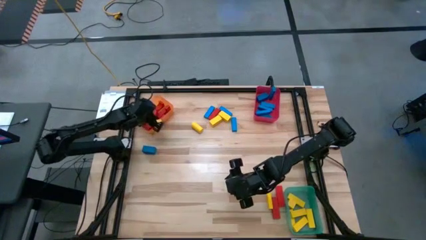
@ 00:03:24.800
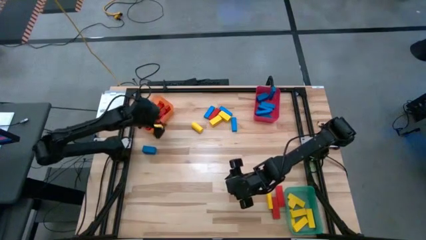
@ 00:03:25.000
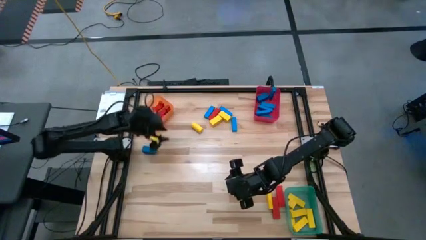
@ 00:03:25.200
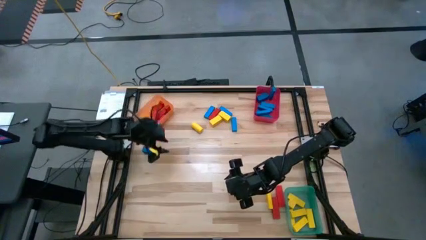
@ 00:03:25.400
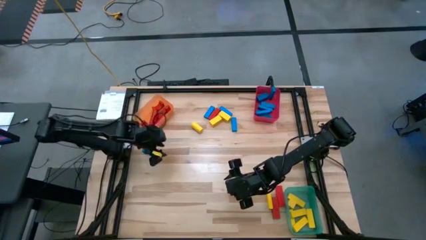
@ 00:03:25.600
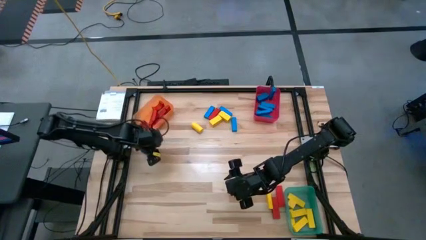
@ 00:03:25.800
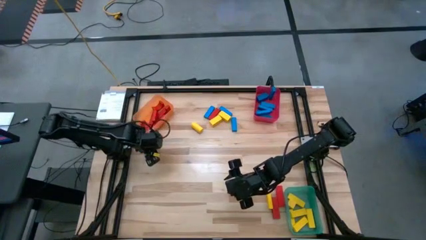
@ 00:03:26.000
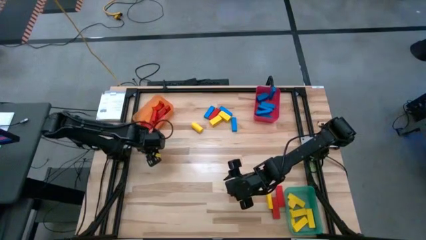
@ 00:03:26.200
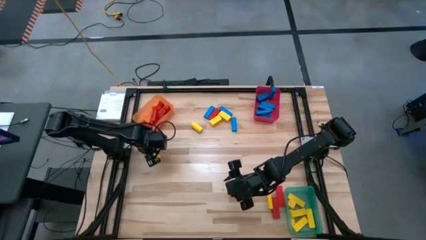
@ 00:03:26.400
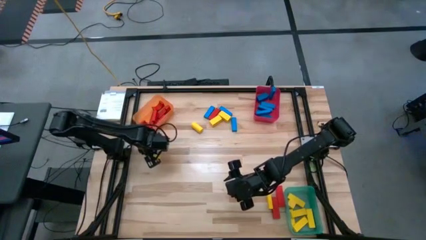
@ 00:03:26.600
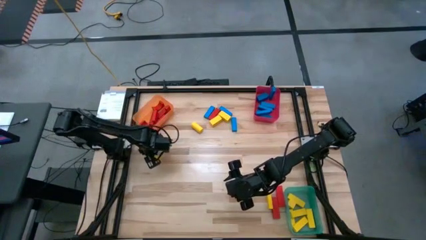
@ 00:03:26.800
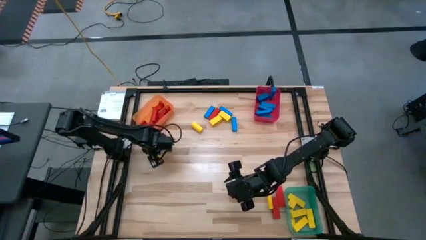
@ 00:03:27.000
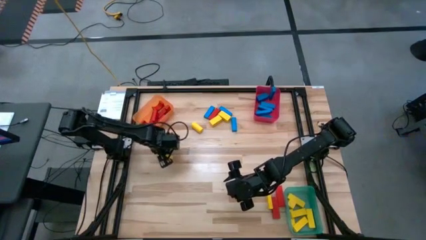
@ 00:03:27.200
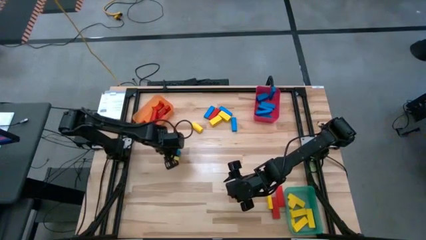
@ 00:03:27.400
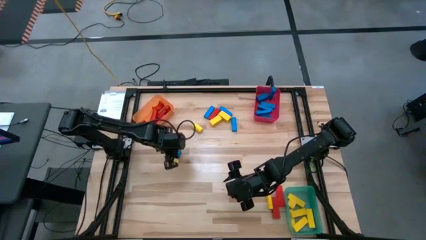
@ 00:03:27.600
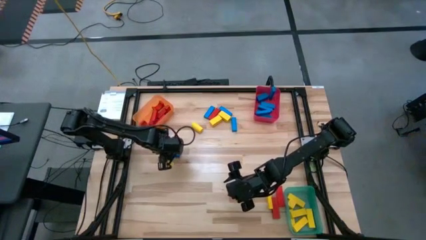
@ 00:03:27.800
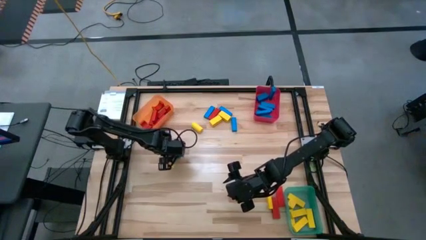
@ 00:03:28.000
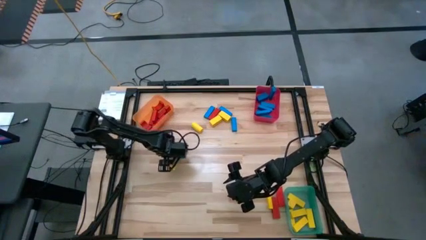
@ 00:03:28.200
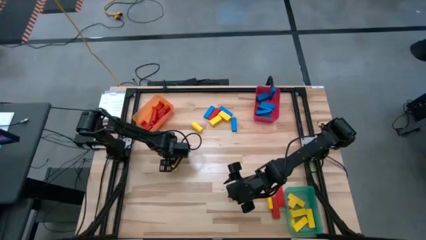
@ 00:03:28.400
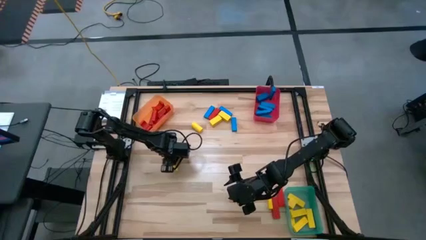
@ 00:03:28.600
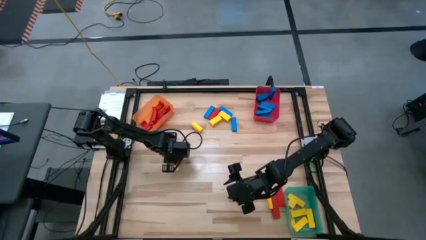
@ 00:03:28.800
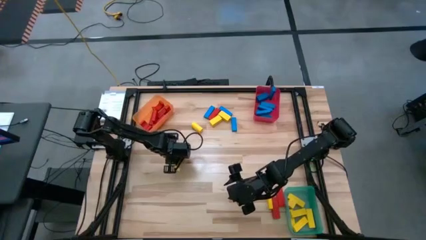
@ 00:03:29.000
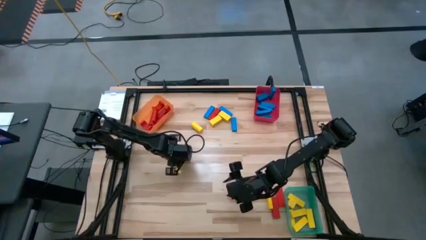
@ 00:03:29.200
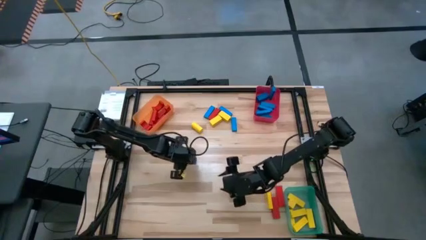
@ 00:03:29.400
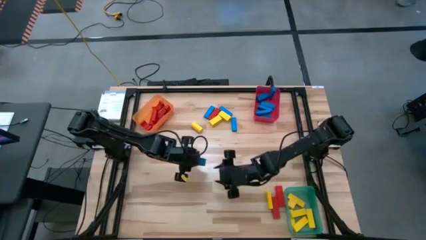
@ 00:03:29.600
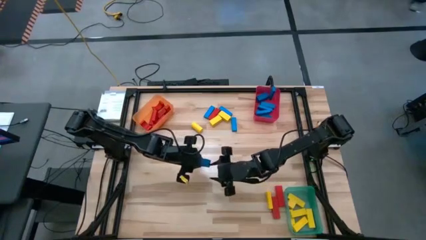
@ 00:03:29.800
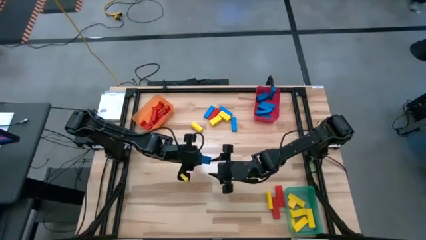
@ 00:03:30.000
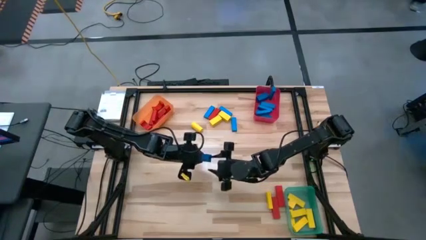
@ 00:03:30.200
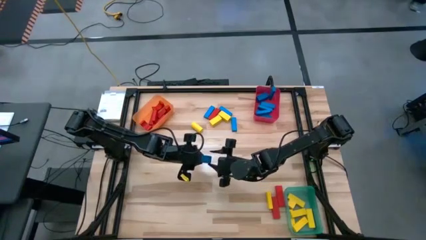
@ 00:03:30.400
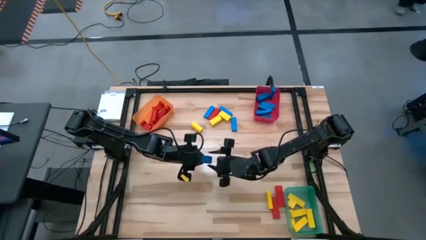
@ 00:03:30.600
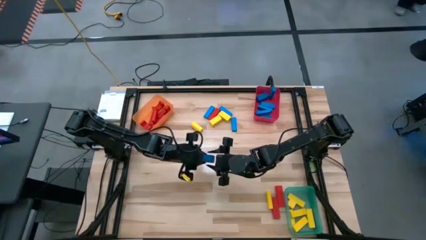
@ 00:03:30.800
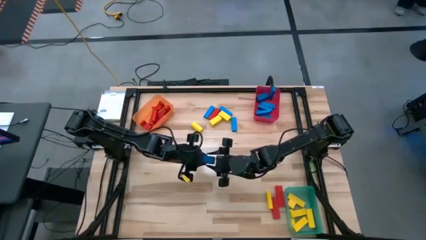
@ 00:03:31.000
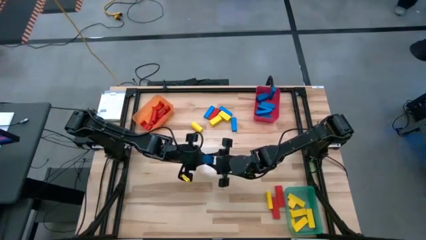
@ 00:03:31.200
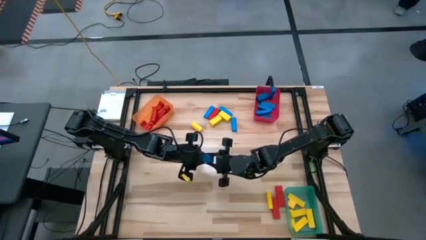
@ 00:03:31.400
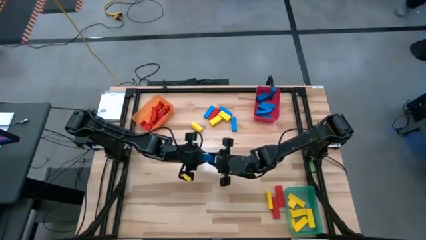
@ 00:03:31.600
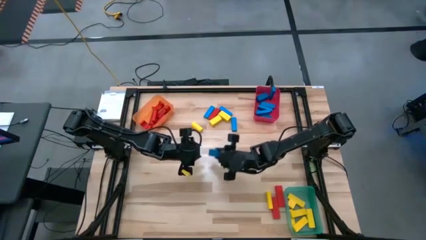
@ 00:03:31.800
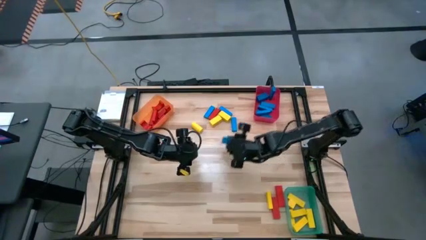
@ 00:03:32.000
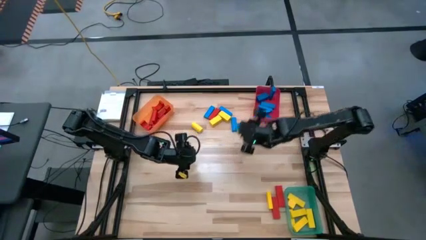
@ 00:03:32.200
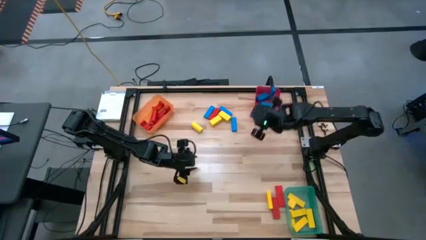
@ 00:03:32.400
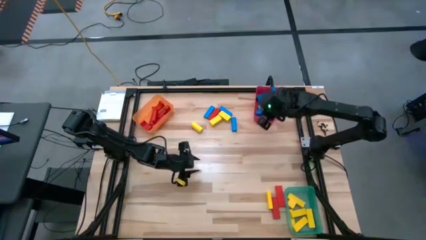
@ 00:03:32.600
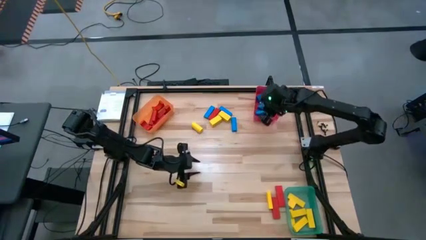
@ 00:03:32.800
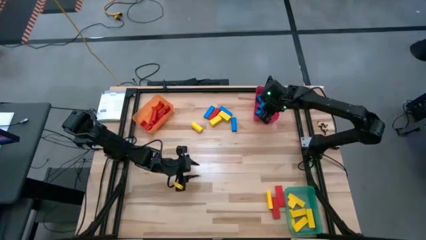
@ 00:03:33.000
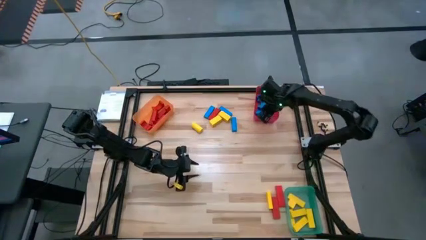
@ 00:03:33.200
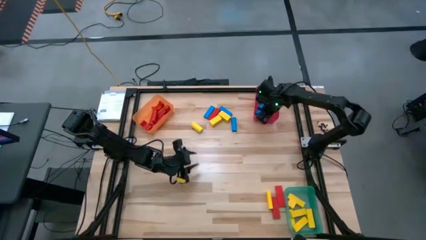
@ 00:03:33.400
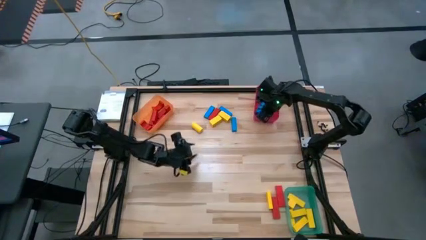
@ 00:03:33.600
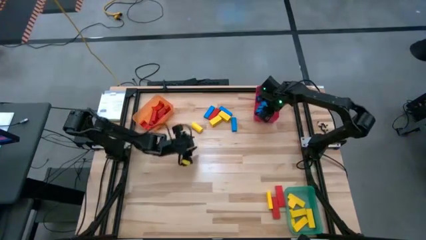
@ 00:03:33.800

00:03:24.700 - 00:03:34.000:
Task: Sort blocks
Put the blue block into the red bin

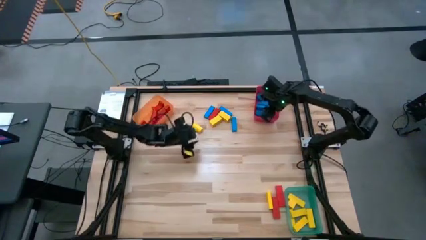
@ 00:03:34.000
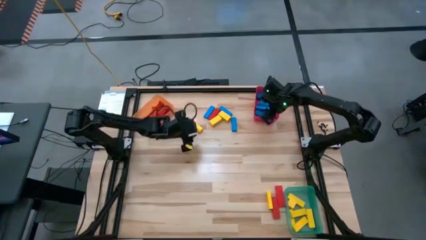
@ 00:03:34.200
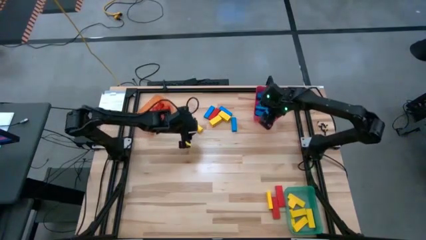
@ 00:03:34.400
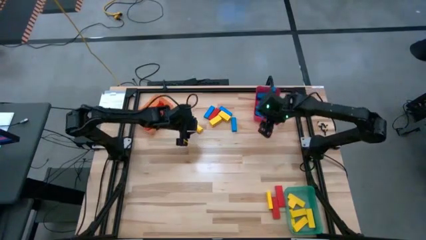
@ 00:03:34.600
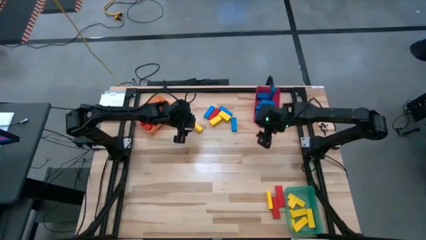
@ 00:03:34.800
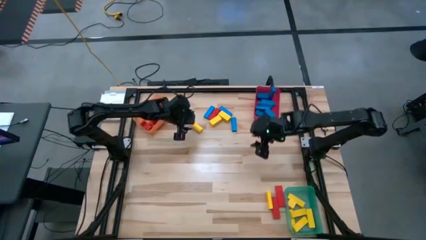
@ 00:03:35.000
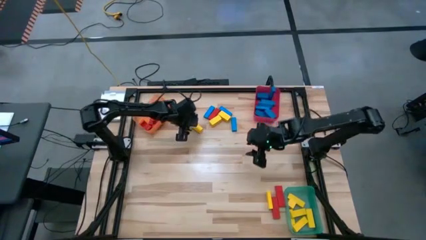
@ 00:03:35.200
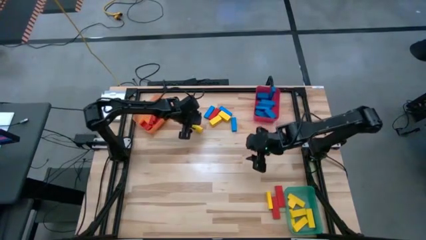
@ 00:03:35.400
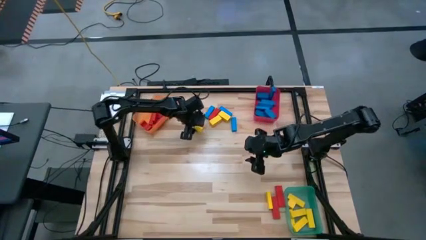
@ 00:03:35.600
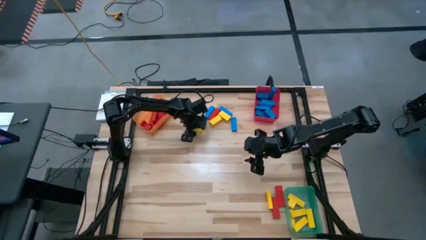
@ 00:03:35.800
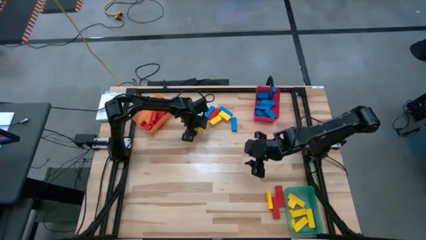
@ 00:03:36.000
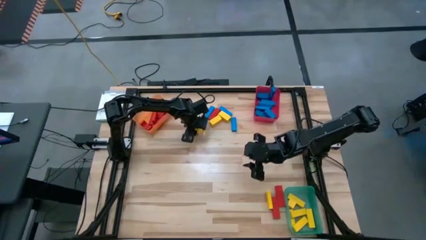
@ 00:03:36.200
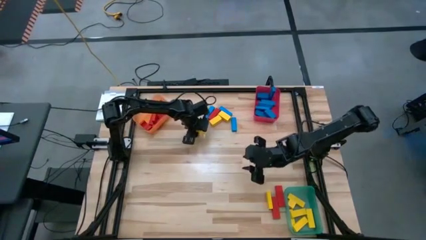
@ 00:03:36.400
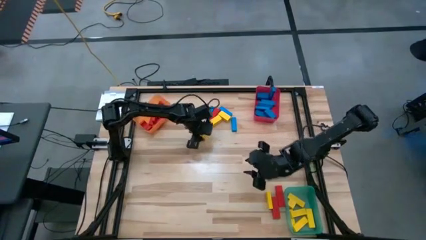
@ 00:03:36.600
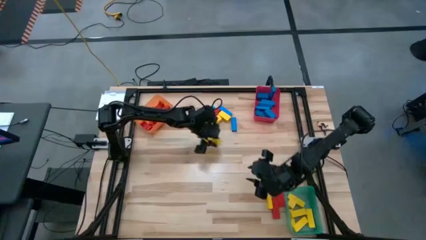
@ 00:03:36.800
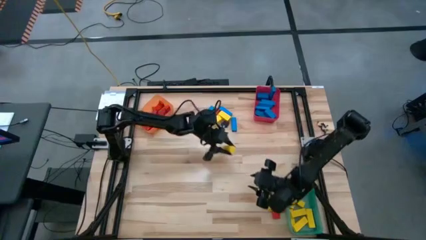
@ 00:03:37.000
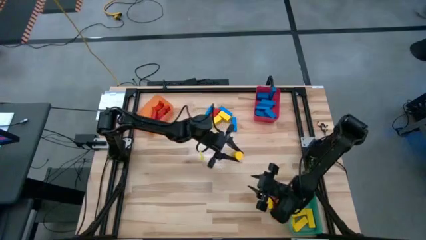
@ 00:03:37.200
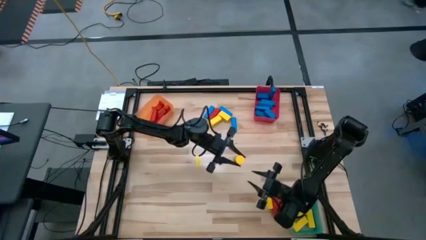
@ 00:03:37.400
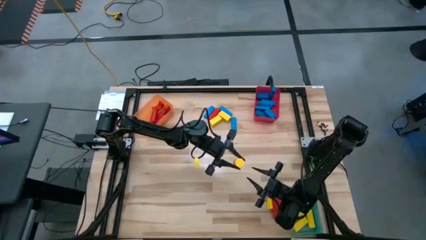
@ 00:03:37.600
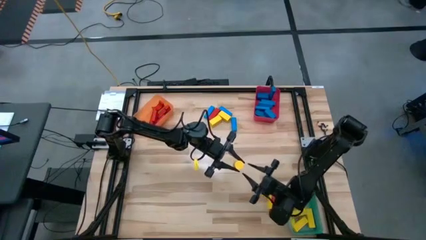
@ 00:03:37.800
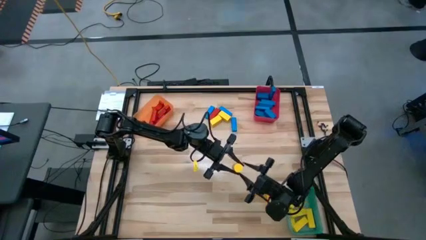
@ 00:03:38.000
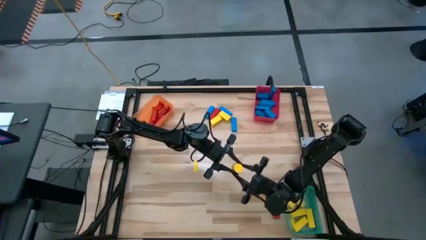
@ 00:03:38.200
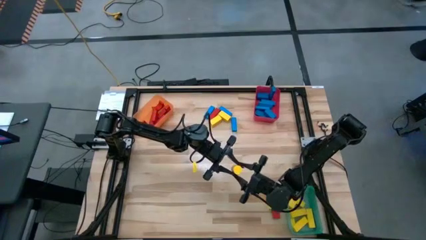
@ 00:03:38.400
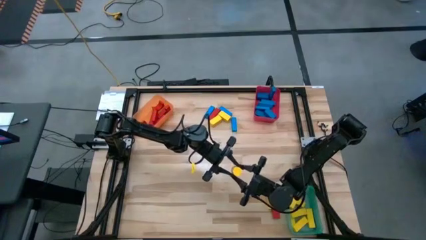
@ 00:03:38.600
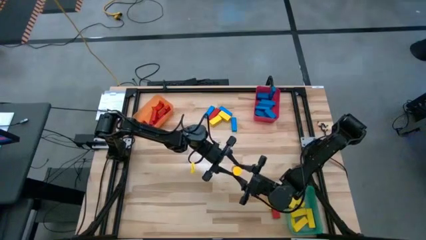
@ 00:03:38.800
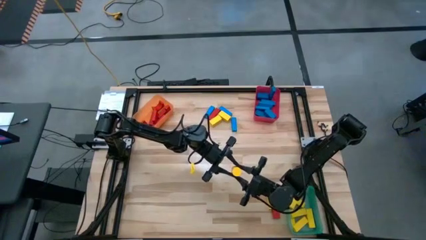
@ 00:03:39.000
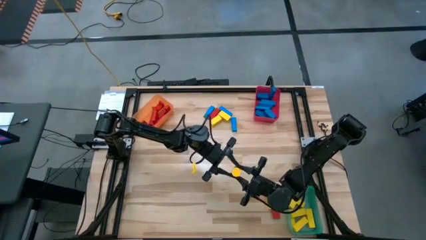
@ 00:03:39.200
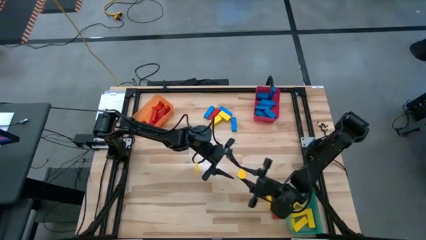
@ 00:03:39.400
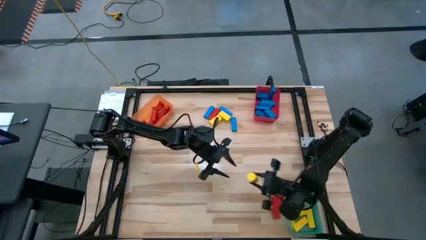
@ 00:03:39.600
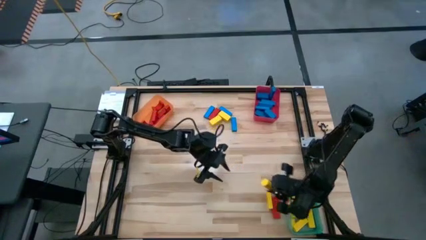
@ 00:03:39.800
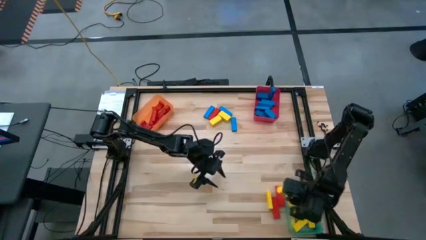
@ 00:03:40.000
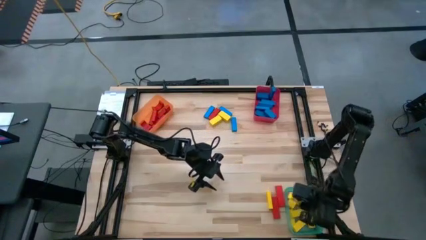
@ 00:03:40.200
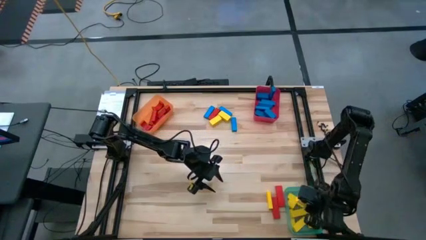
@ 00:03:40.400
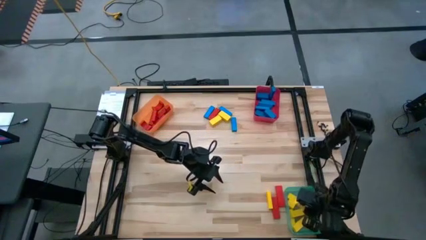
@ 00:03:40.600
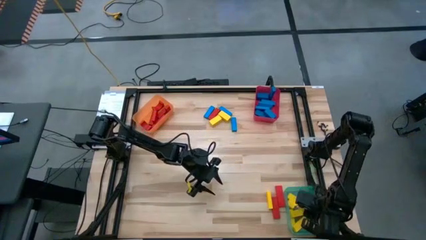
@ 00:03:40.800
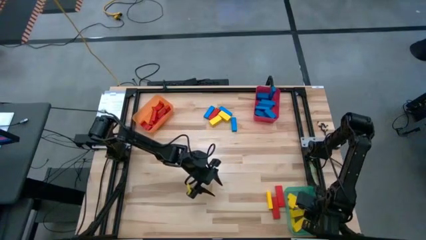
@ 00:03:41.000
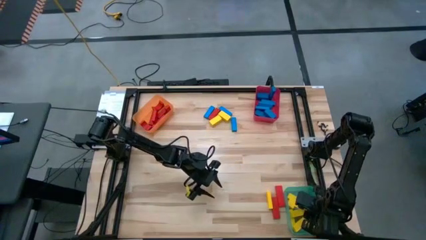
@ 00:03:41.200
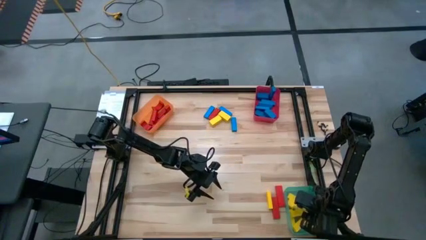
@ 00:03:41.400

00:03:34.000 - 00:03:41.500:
Put the yellow block into the green bin
